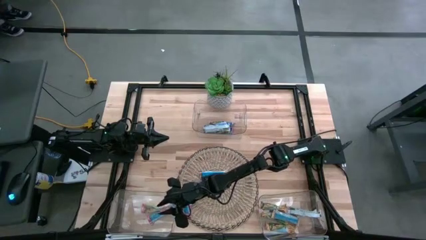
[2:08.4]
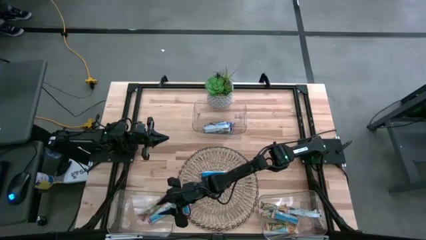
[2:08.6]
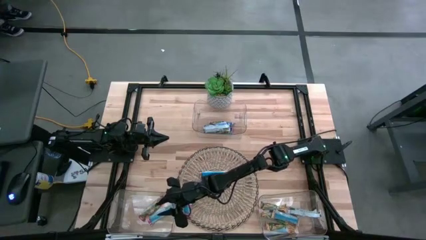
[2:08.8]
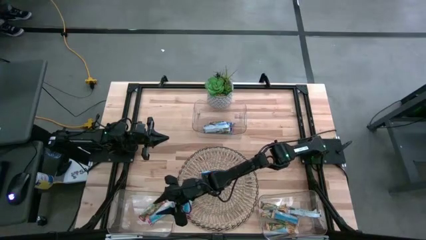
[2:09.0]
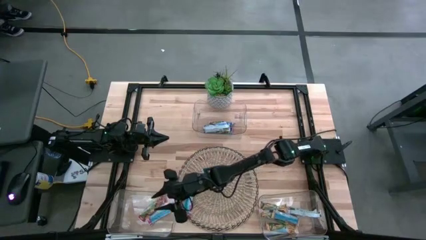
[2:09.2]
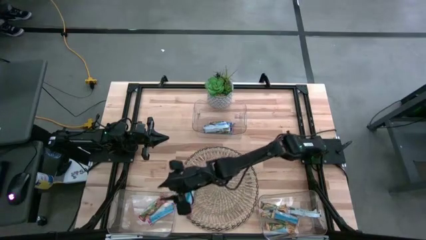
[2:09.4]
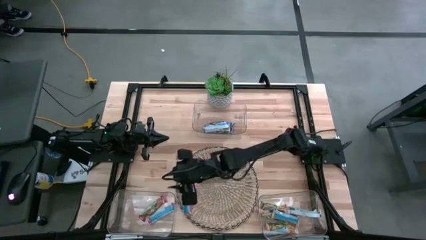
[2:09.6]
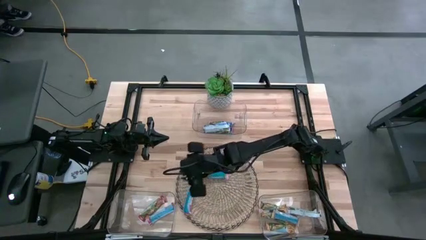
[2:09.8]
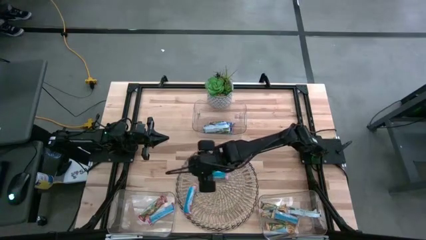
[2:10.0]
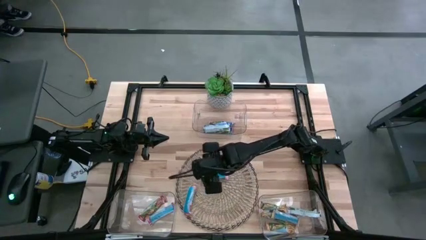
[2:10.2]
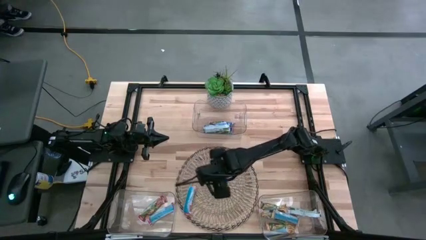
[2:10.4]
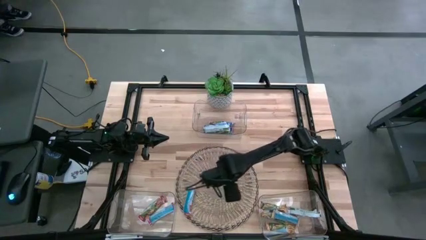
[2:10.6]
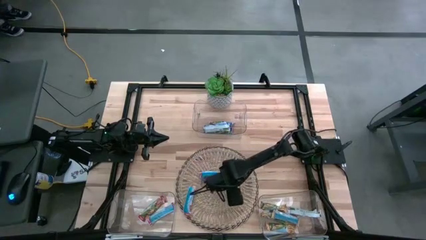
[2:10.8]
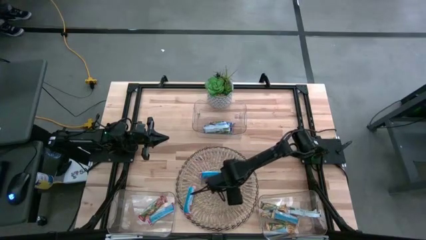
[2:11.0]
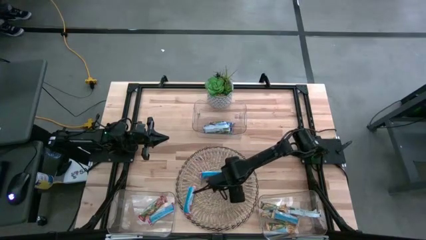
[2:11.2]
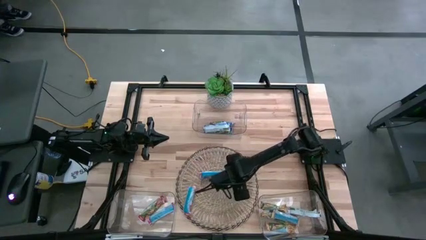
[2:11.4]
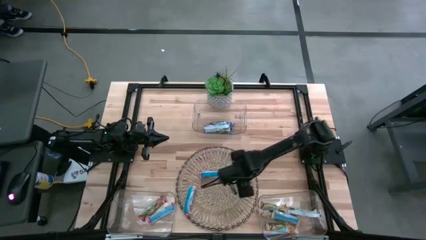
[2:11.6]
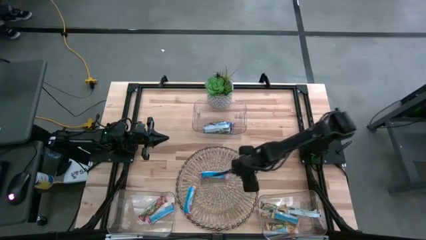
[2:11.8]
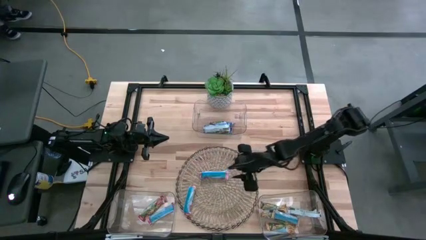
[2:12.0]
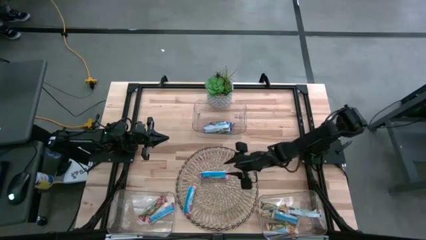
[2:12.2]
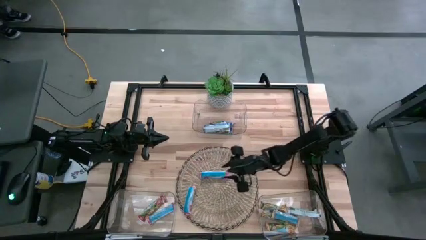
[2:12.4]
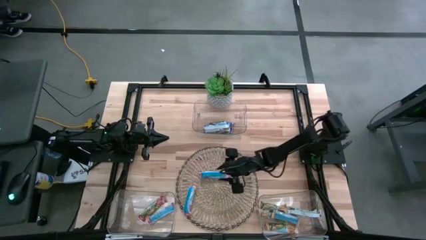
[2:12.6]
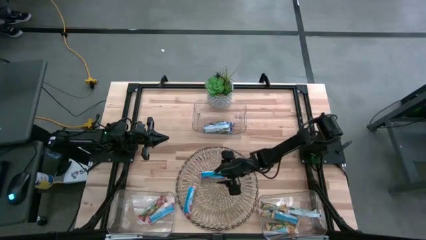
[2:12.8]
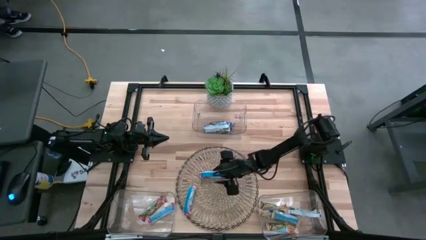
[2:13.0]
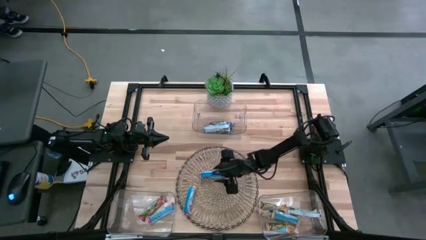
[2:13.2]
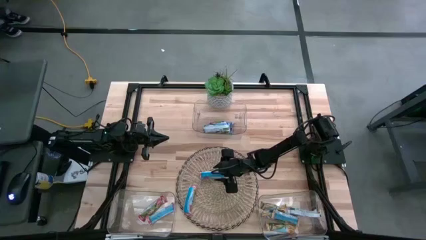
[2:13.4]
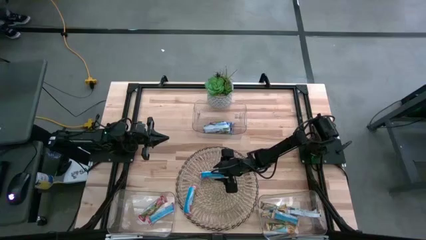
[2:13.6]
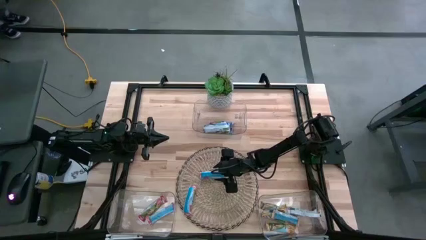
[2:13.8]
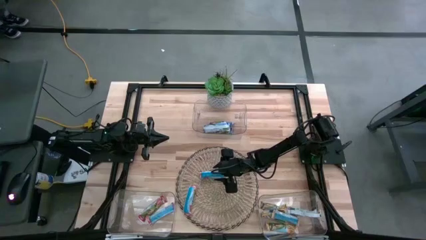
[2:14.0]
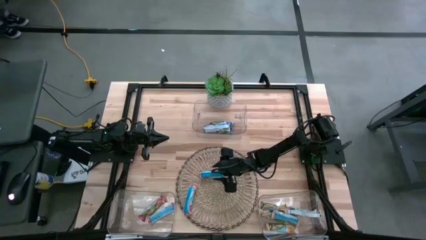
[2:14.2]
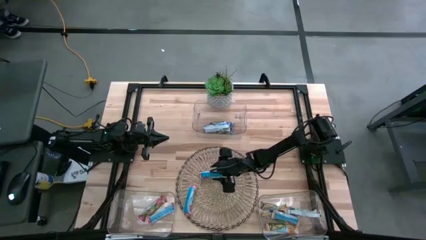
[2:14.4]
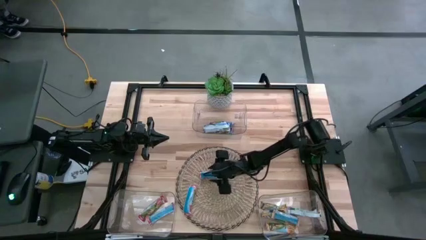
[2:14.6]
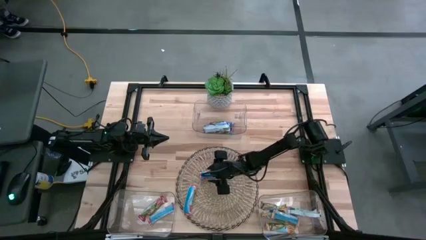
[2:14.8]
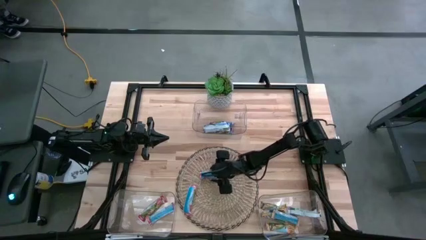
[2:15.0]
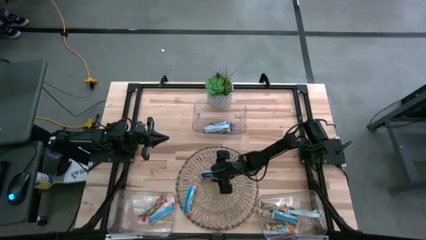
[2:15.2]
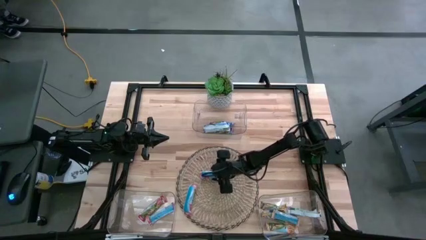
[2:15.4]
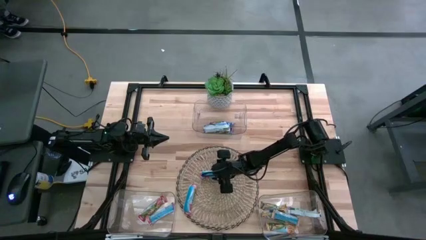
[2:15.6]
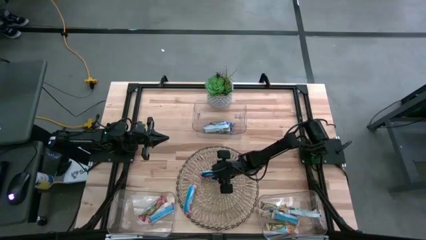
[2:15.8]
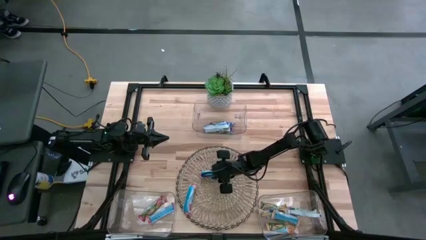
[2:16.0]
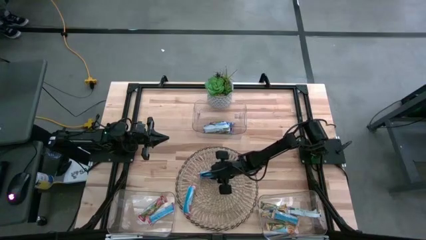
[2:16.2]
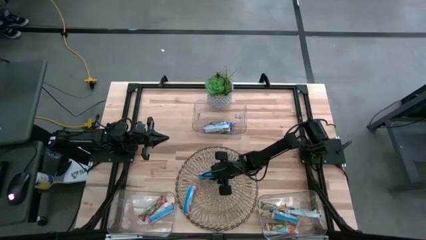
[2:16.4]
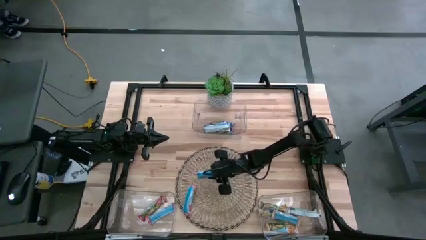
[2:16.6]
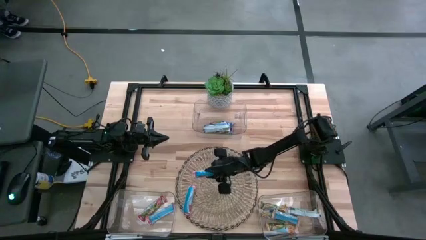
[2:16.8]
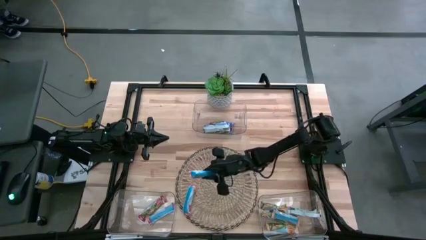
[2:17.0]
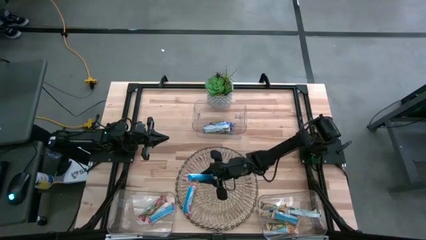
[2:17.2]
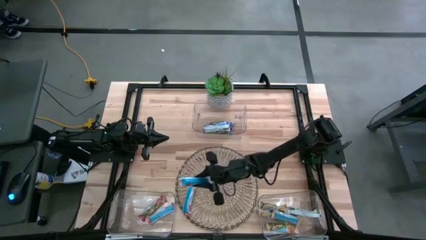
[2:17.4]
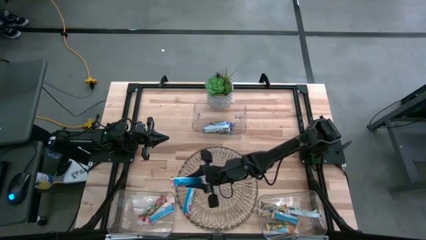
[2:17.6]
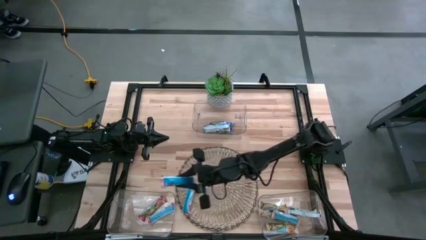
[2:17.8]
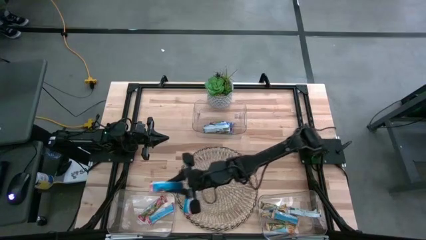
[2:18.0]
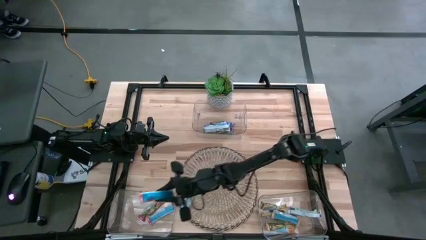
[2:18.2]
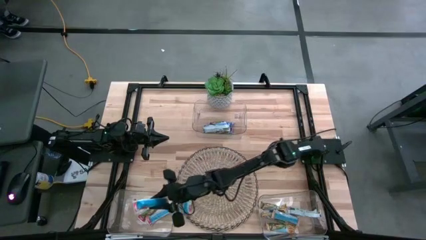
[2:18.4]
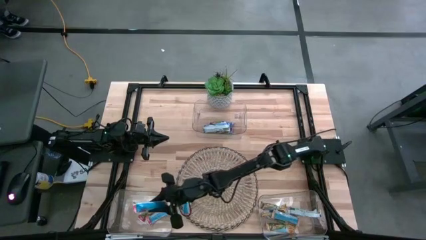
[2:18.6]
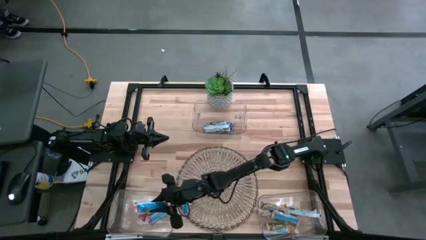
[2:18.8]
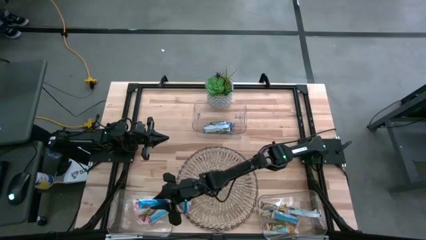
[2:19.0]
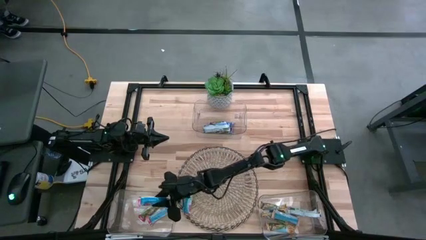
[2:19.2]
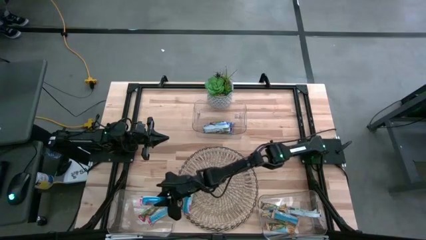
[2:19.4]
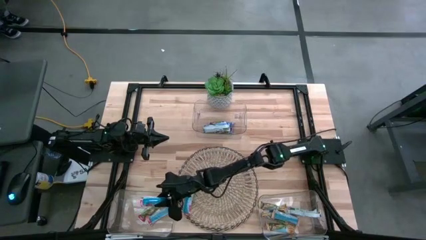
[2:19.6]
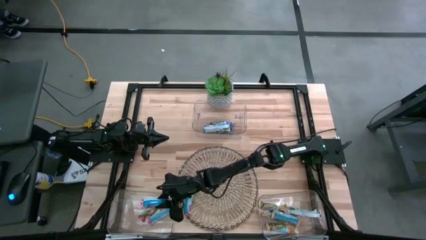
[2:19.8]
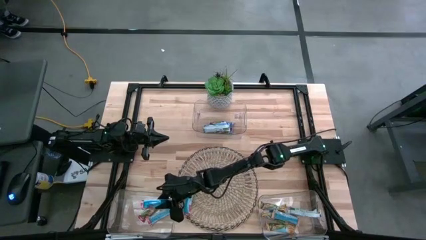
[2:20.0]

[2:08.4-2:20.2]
Task: Pick and place Granola Bars by type
Put the red granola bar into the bottom left transparent bin

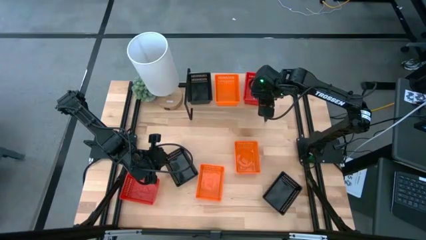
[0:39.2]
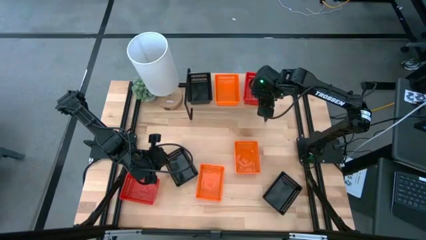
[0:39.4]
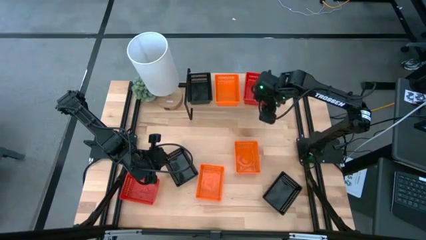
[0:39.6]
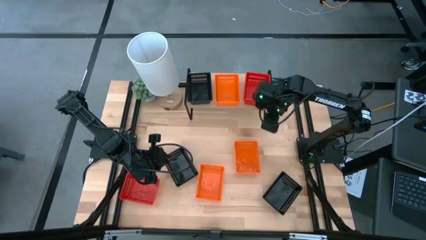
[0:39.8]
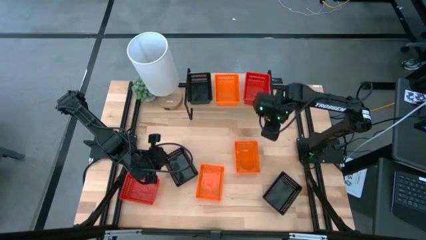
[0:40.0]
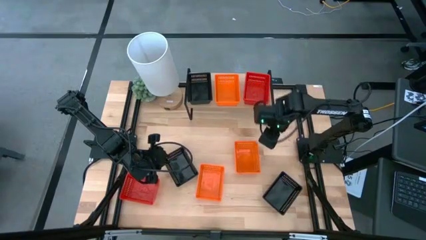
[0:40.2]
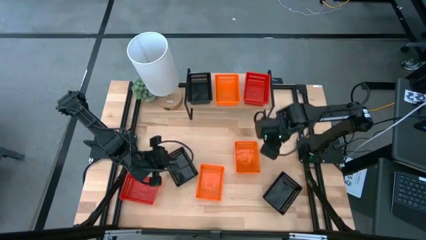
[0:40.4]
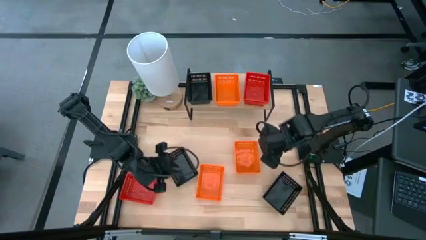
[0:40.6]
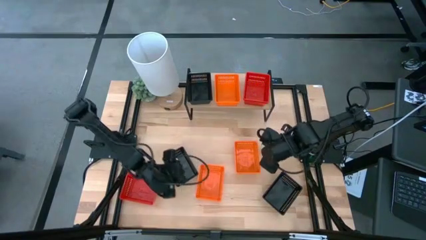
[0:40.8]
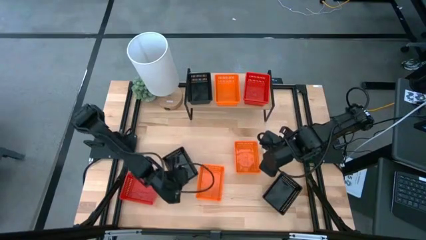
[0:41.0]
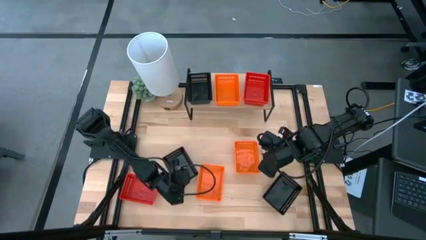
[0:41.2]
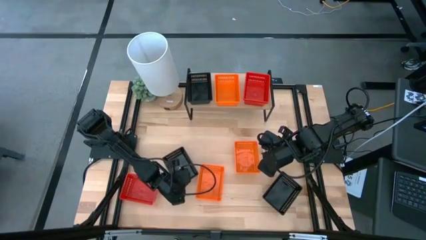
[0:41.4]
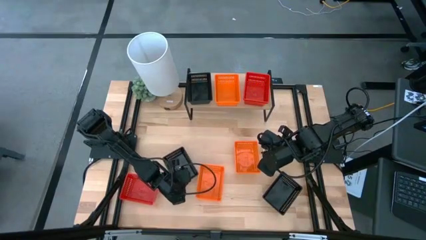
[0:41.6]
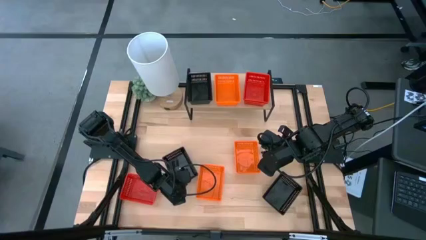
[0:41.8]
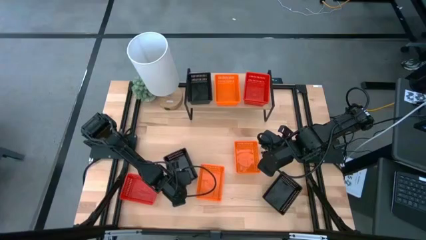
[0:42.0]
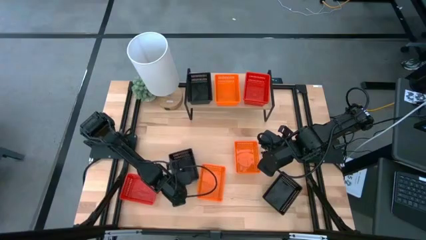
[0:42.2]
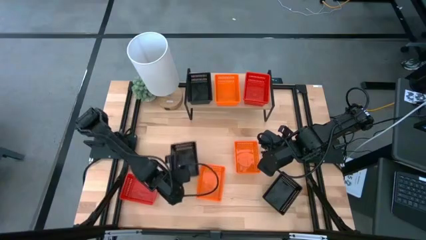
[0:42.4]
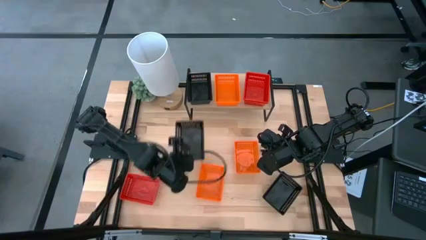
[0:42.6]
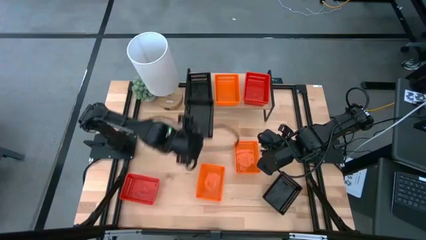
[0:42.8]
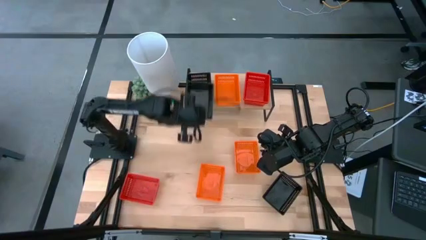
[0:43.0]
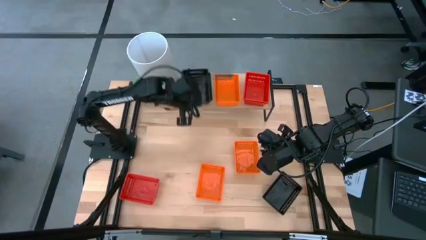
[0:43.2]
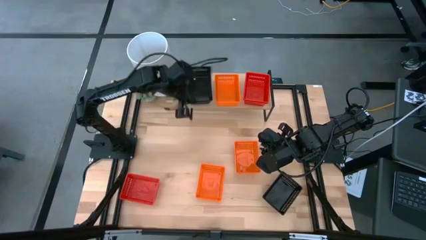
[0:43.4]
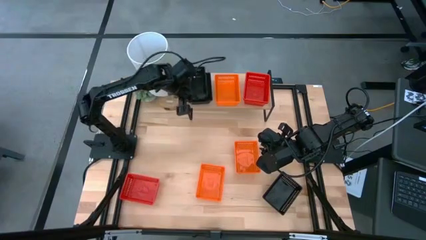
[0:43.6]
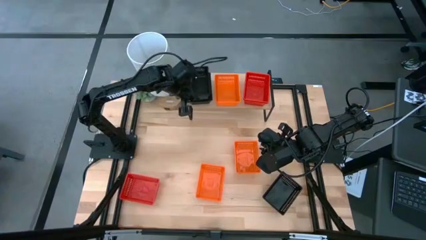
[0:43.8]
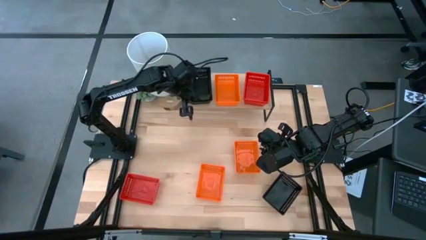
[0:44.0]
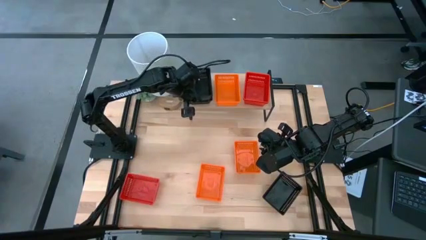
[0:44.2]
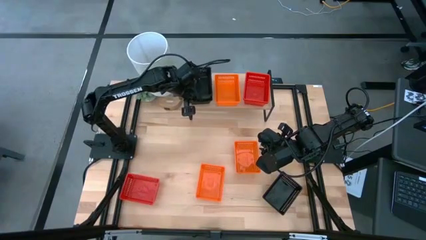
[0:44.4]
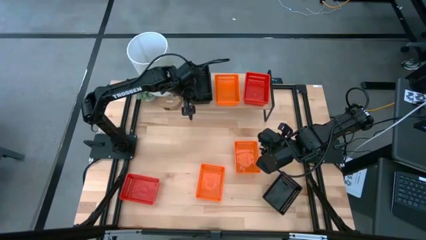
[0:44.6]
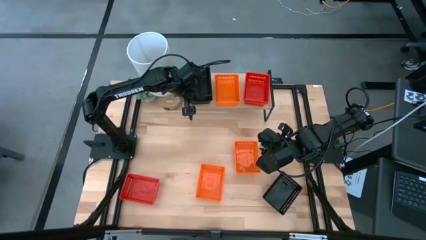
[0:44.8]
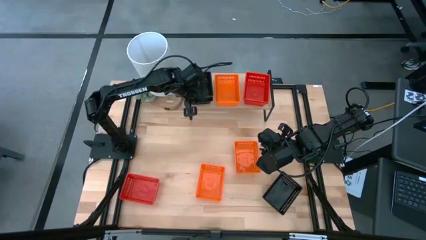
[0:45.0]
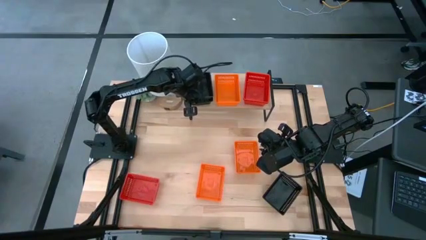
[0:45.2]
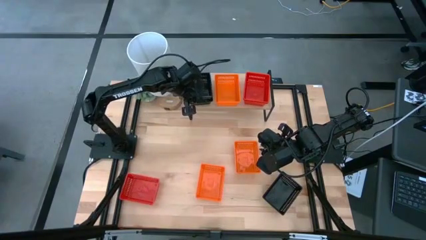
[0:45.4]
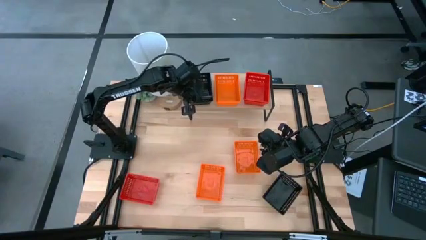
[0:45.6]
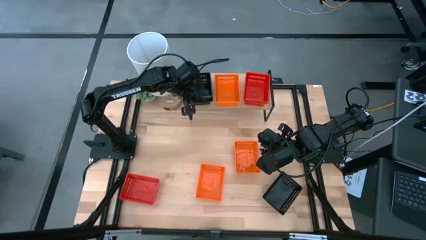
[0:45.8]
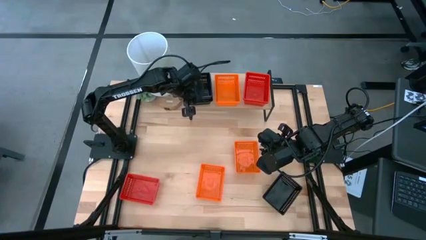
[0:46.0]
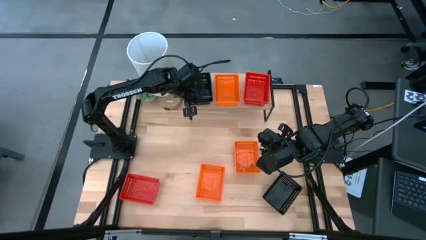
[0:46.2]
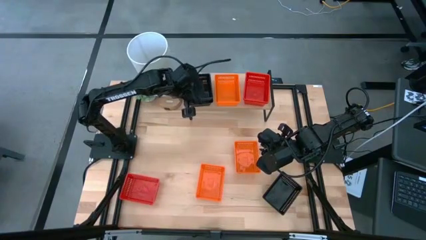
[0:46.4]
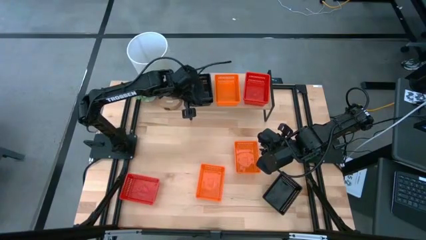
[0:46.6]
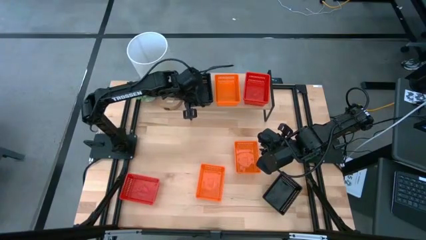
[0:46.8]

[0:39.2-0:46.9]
Task: Stack baskets on shelf by color
Stack the left black bin on top of the black bin on the shelf
